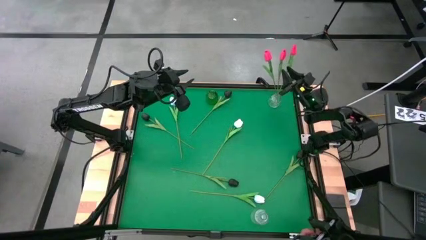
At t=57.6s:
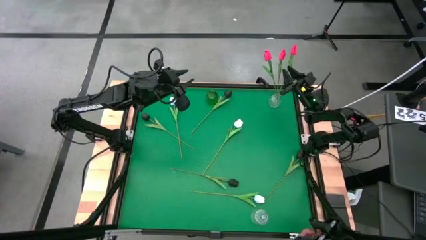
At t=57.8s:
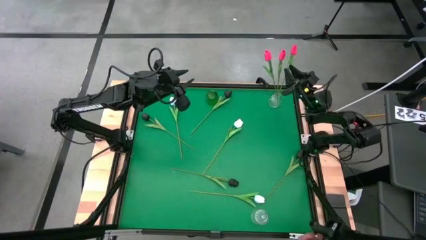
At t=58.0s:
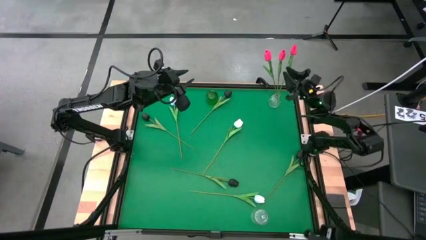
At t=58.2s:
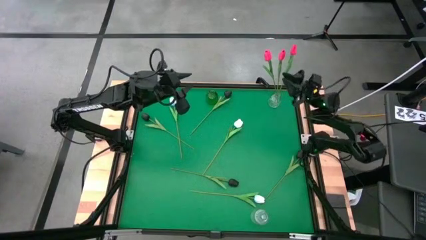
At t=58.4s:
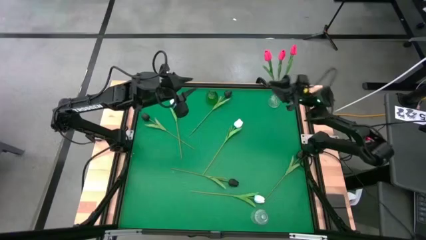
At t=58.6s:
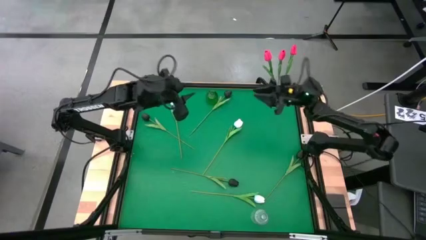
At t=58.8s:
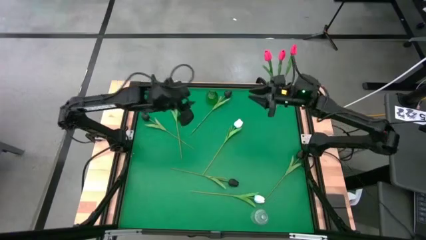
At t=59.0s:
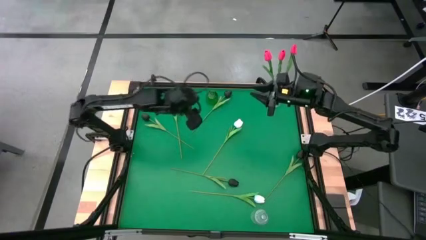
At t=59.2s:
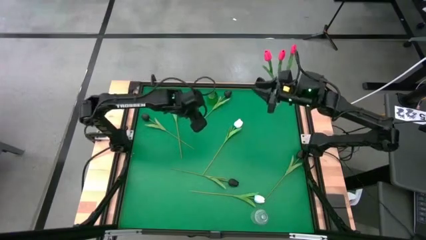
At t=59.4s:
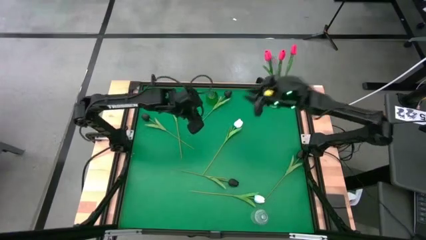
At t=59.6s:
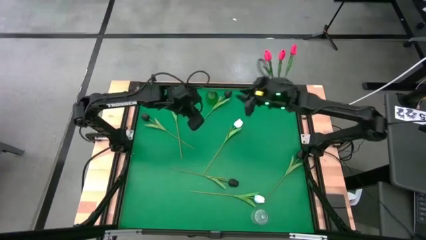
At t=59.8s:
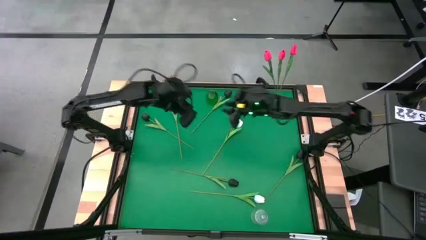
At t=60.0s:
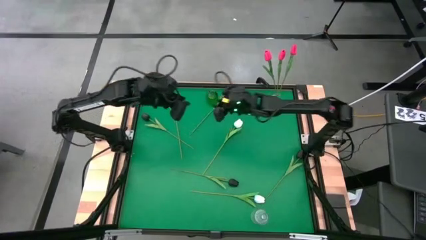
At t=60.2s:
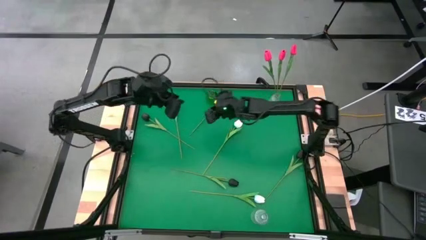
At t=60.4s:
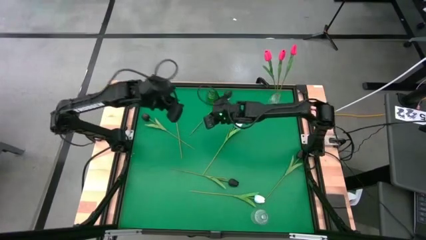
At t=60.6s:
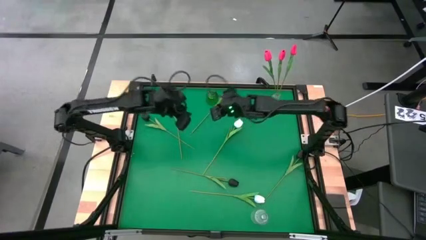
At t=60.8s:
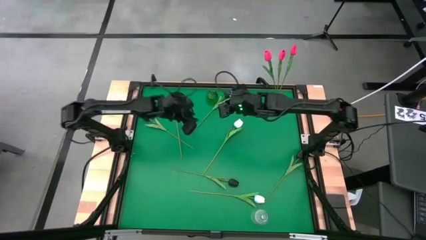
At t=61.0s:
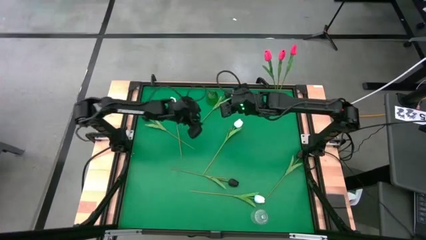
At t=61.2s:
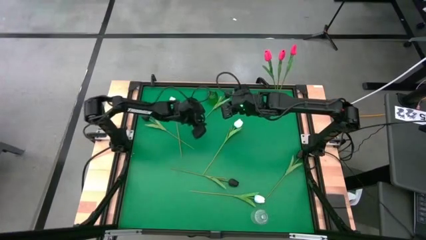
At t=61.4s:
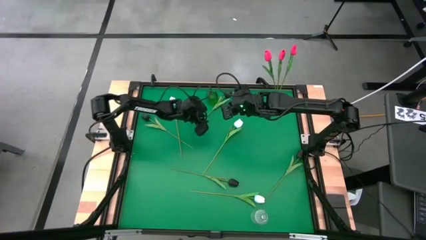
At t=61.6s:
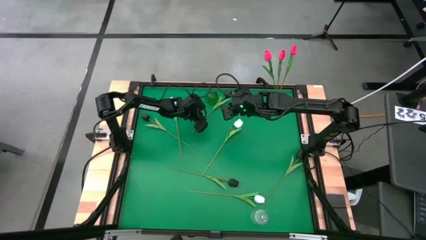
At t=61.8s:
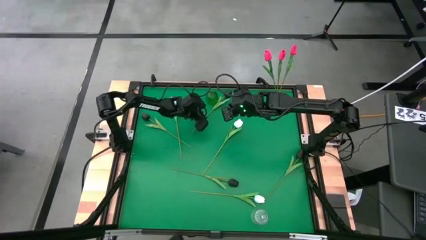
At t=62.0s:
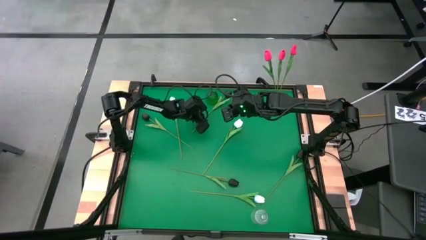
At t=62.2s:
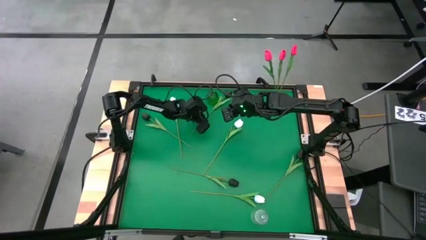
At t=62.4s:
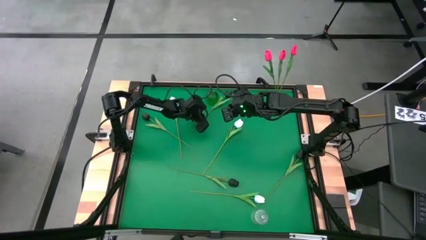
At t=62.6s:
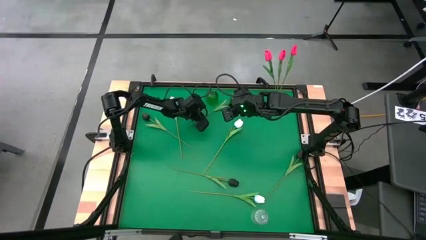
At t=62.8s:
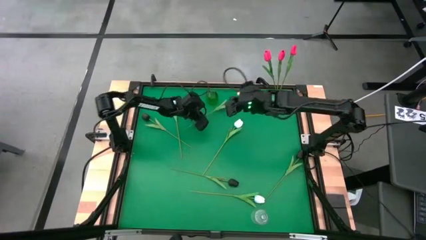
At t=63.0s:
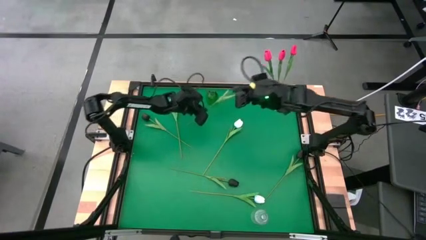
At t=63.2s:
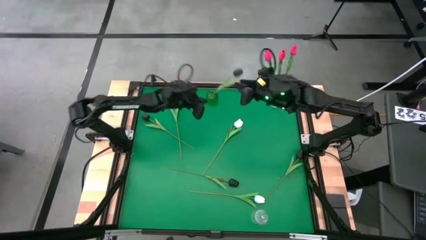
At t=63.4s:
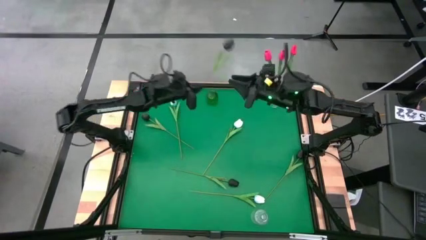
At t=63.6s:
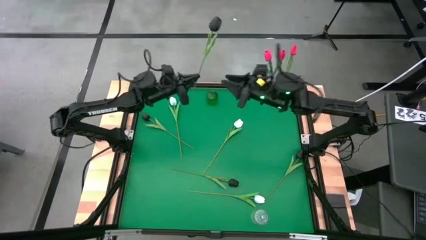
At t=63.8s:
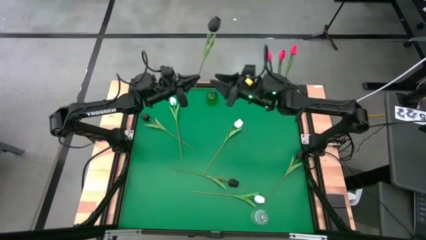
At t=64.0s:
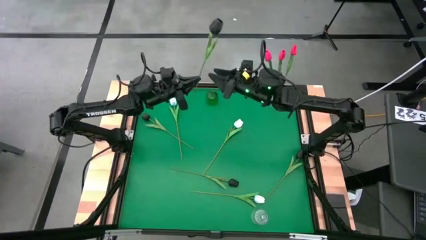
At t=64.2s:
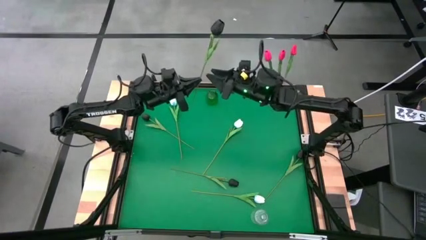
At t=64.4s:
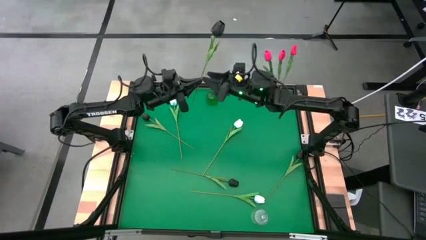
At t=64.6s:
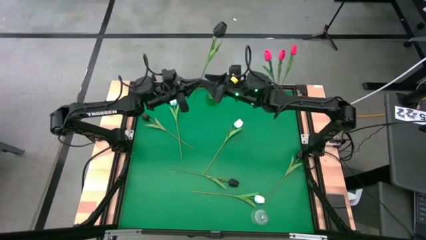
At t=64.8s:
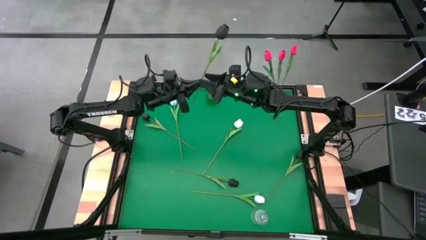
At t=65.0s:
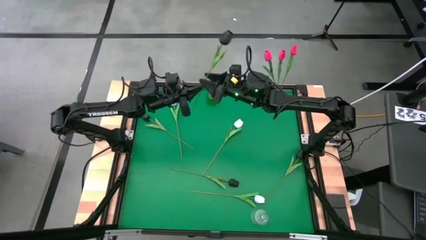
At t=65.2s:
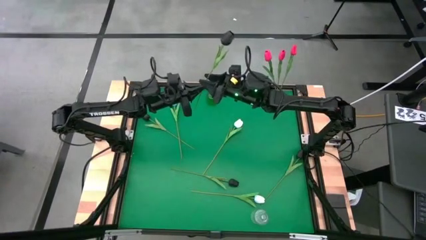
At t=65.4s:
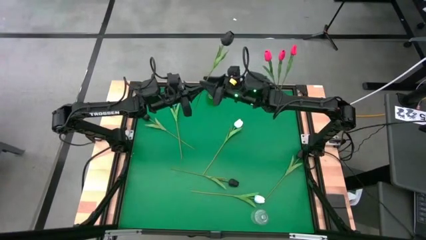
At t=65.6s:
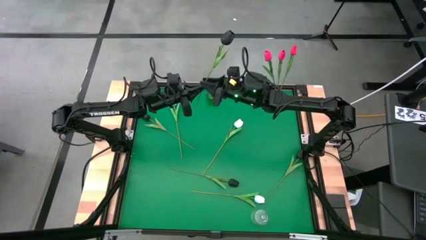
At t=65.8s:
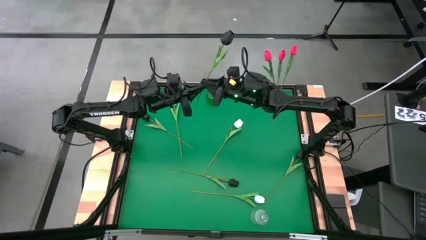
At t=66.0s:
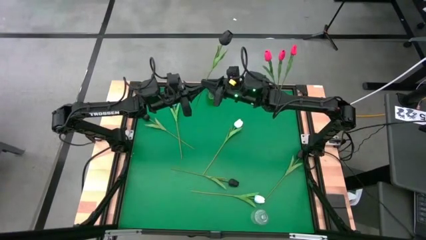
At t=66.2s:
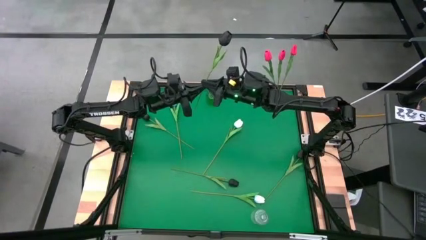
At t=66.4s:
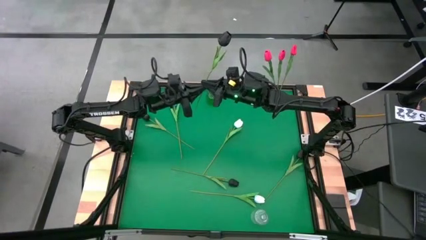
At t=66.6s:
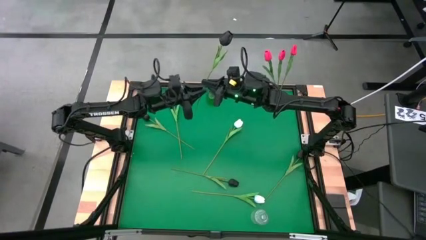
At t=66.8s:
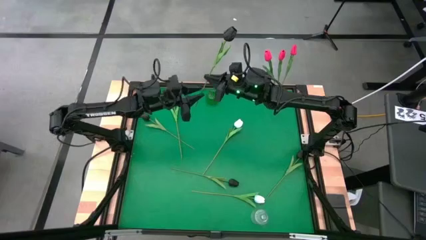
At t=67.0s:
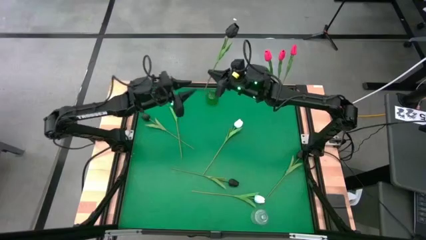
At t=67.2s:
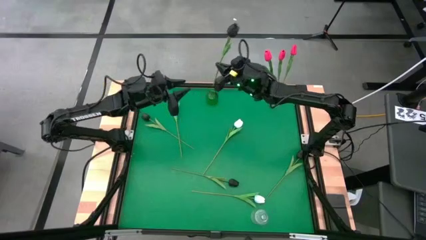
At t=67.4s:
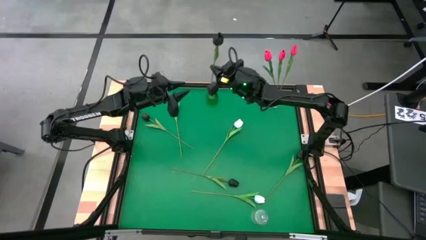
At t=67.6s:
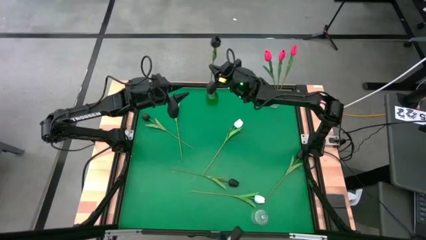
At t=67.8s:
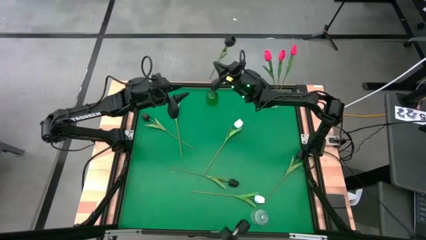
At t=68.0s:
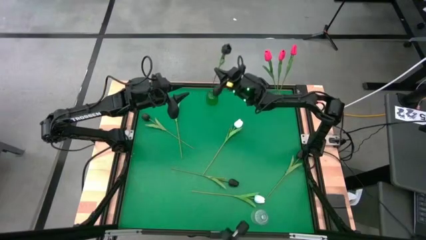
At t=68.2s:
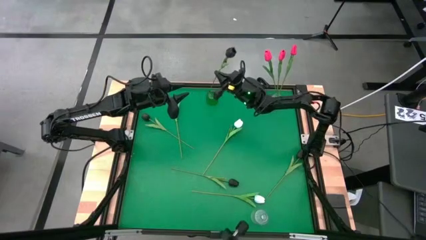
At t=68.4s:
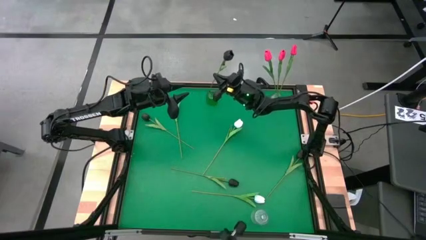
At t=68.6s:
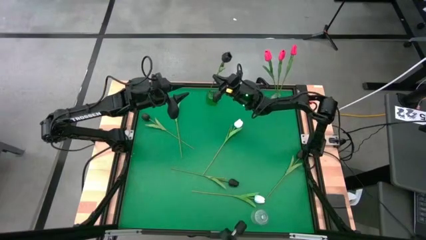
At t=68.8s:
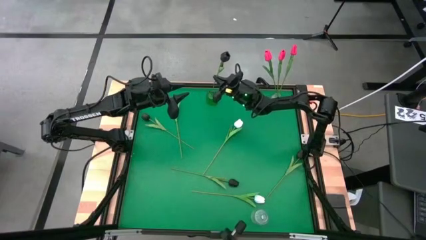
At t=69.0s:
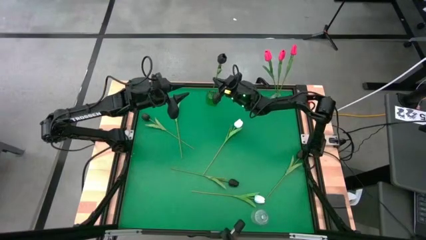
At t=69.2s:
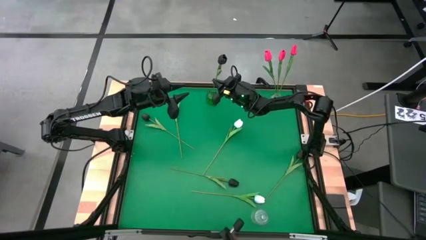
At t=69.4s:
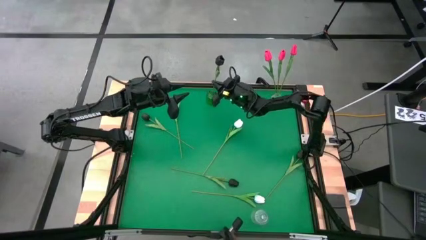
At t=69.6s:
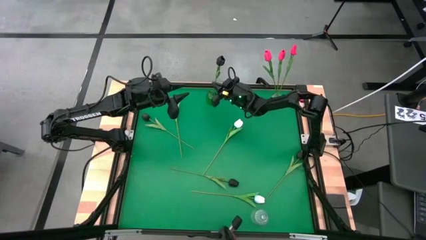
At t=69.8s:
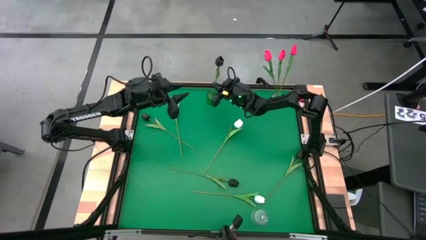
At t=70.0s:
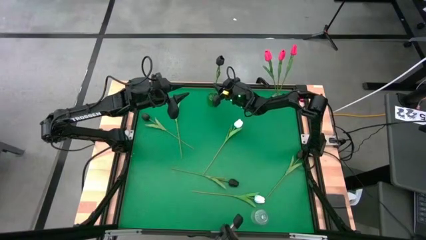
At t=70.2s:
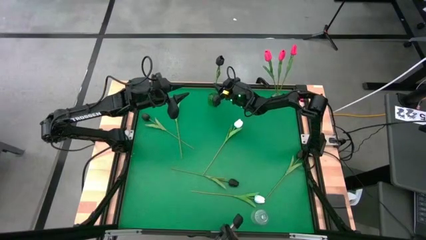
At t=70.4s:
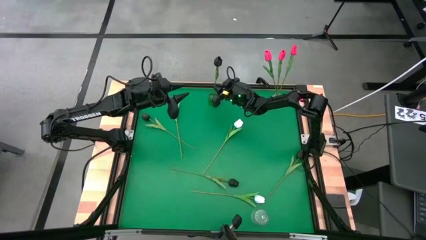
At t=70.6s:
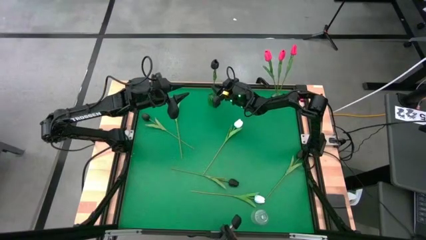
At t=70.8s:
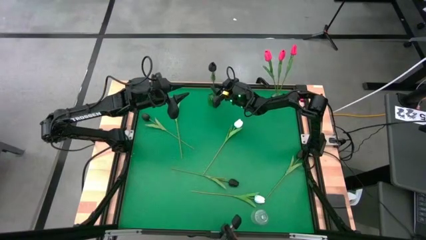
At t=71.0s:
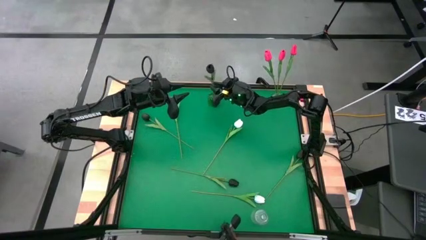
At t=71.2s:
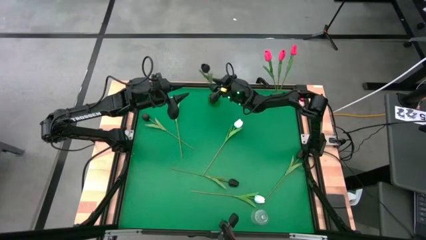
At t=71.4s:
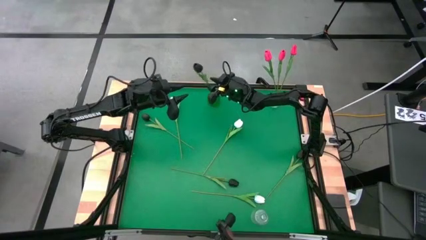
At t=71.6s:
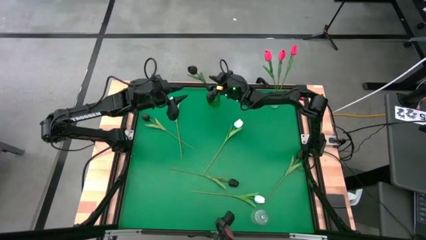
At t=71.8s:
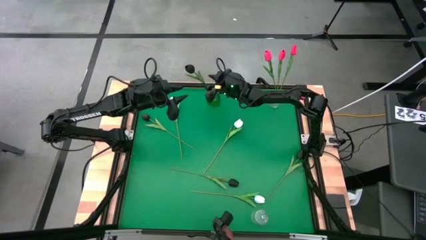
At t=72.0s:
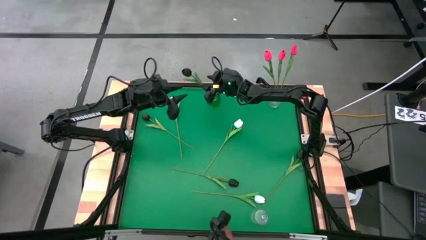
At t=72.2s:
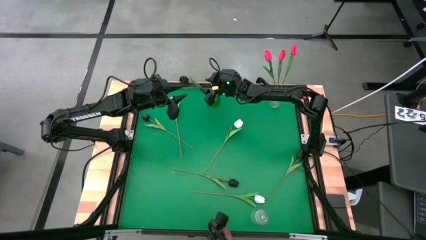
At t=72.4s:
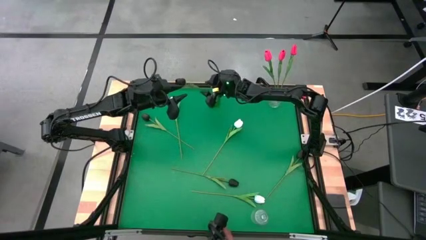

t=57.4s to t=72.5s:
Task: Sort flowers into vase by color
Put the black tulip into the green vase
